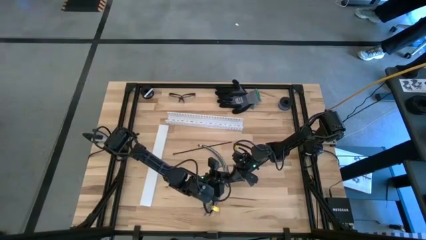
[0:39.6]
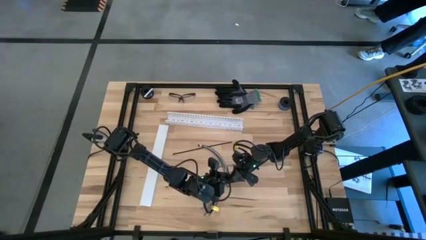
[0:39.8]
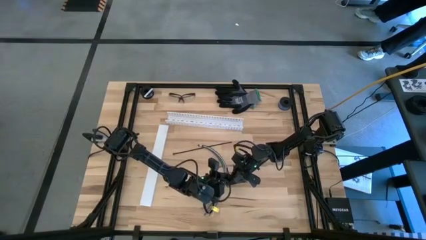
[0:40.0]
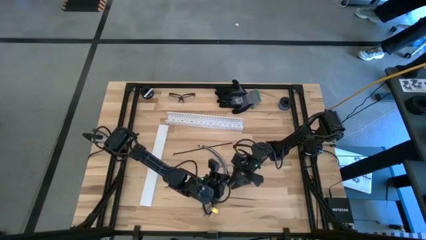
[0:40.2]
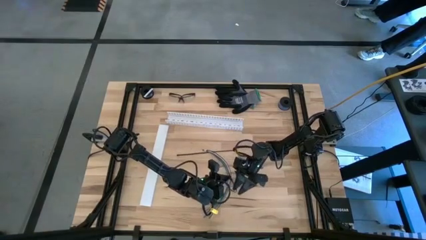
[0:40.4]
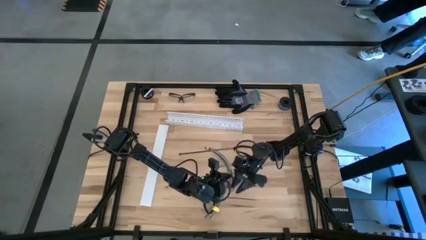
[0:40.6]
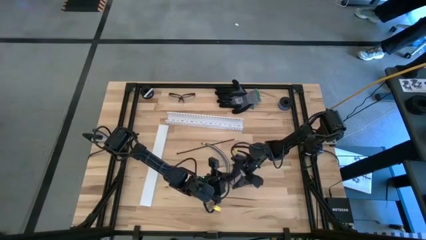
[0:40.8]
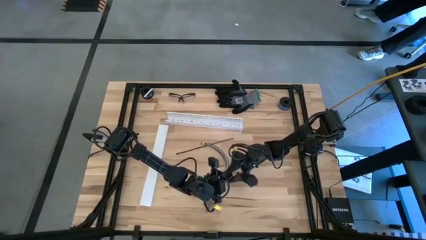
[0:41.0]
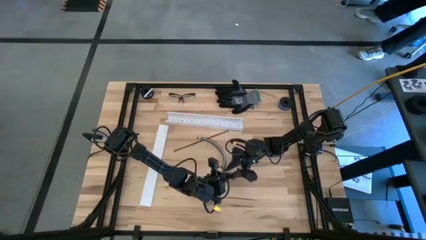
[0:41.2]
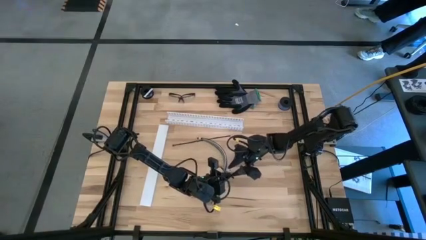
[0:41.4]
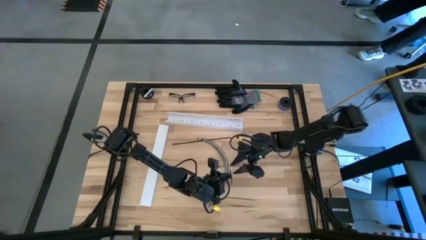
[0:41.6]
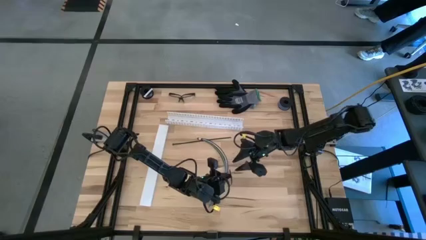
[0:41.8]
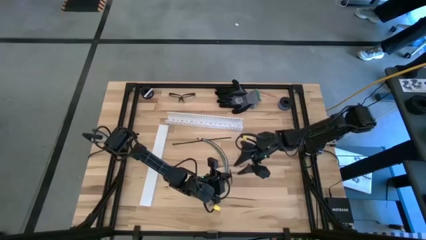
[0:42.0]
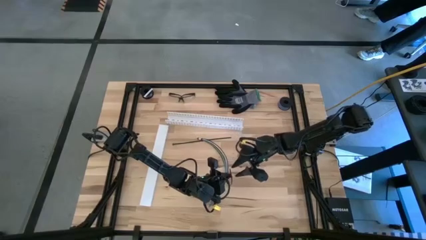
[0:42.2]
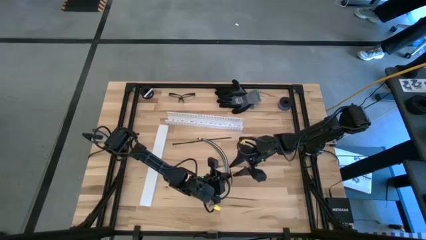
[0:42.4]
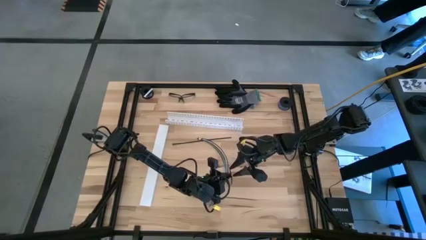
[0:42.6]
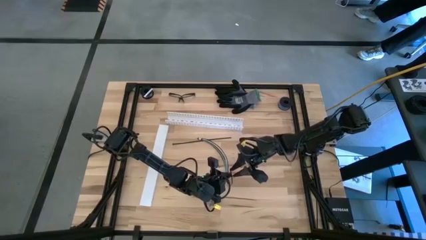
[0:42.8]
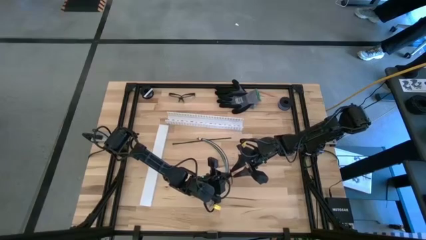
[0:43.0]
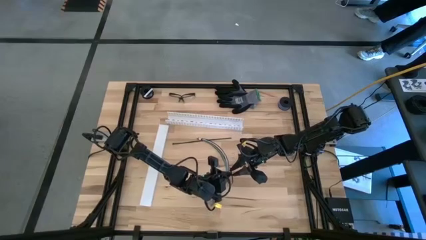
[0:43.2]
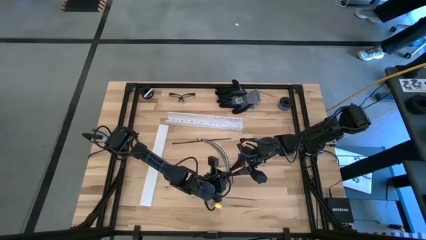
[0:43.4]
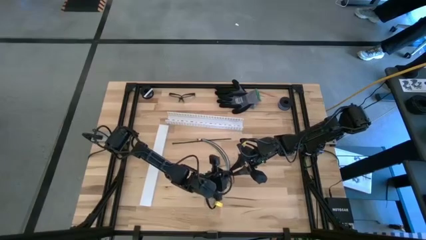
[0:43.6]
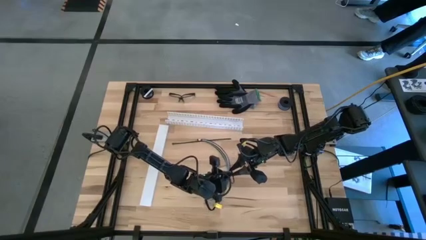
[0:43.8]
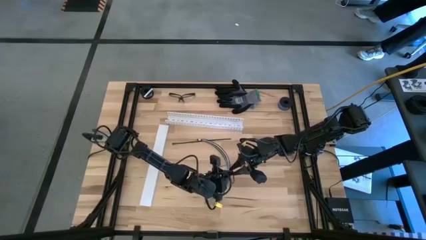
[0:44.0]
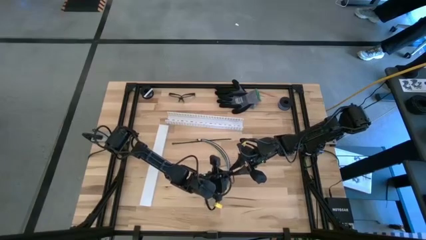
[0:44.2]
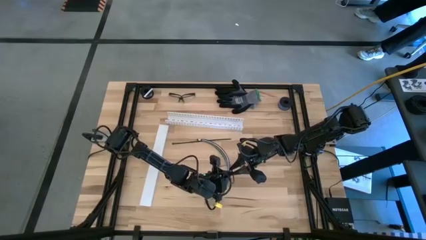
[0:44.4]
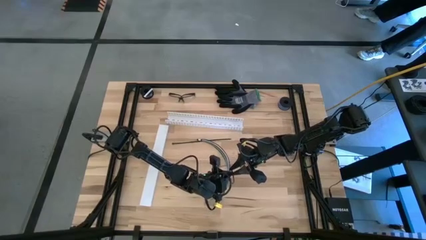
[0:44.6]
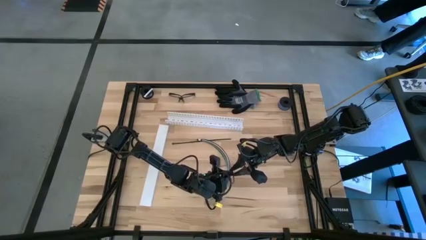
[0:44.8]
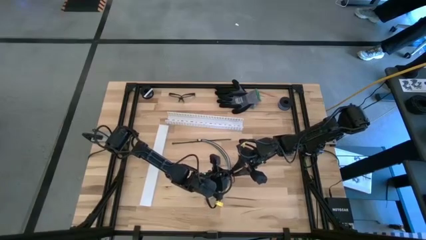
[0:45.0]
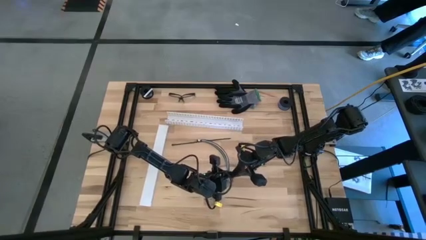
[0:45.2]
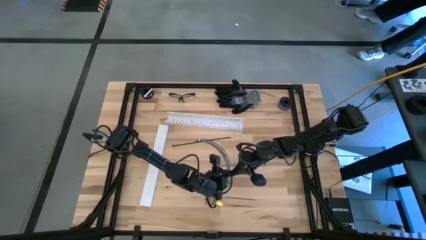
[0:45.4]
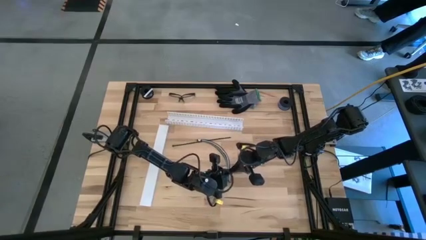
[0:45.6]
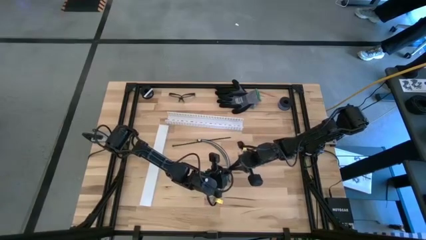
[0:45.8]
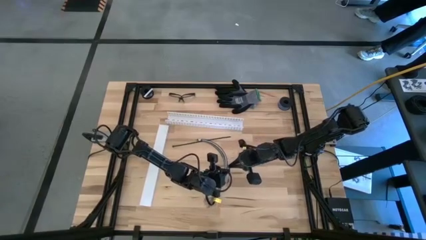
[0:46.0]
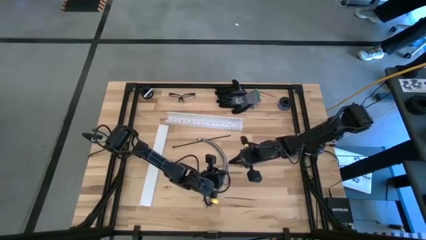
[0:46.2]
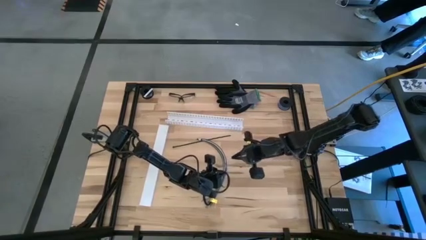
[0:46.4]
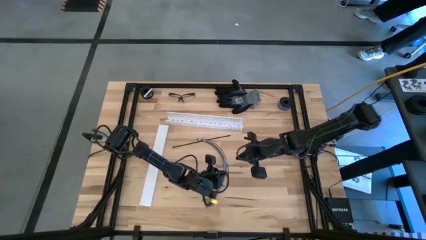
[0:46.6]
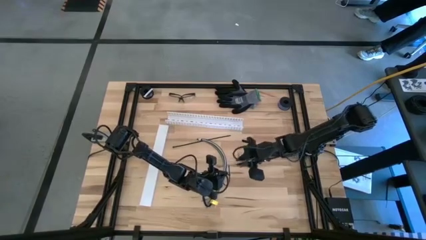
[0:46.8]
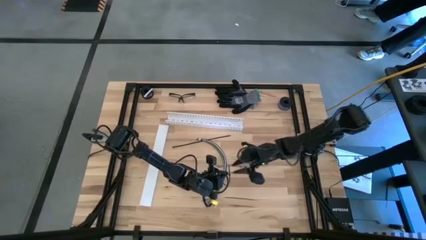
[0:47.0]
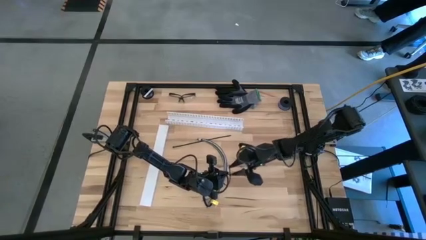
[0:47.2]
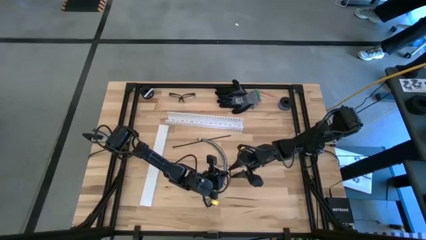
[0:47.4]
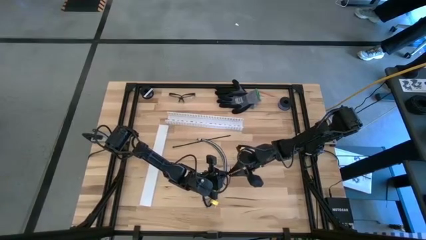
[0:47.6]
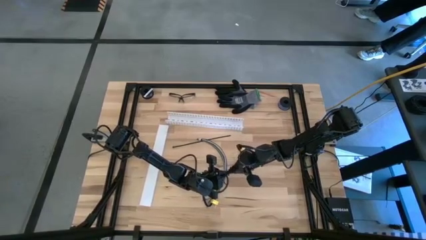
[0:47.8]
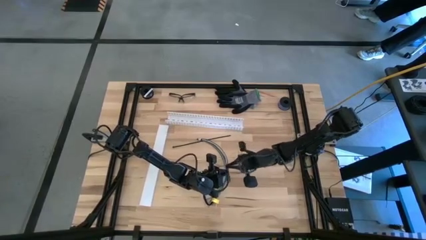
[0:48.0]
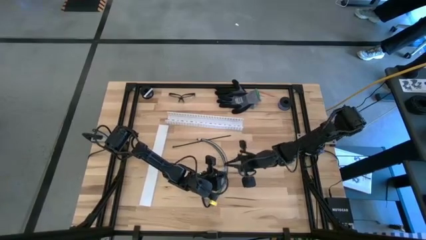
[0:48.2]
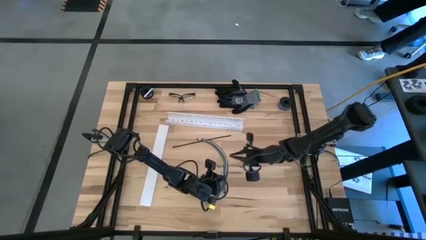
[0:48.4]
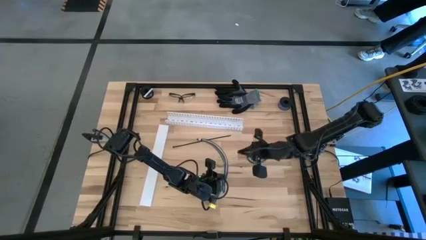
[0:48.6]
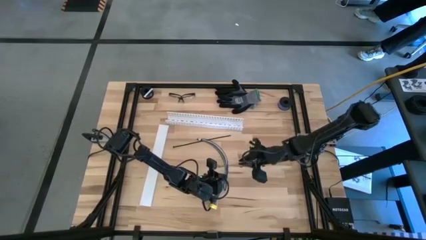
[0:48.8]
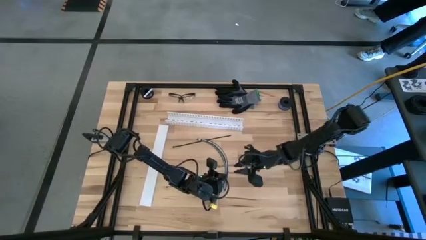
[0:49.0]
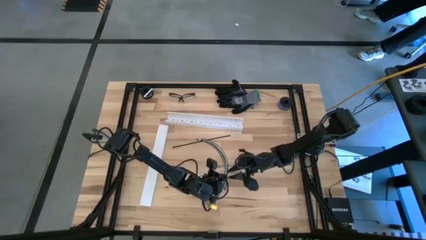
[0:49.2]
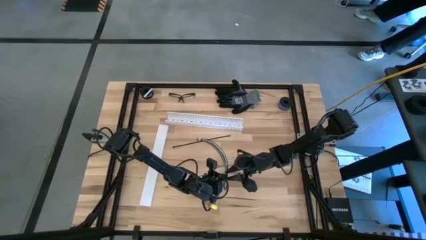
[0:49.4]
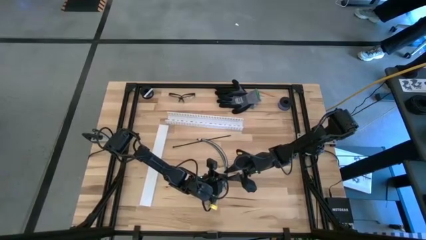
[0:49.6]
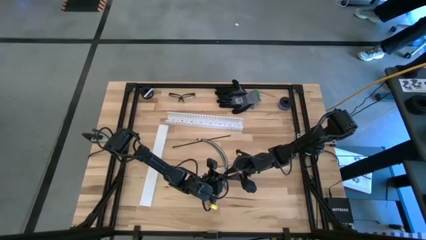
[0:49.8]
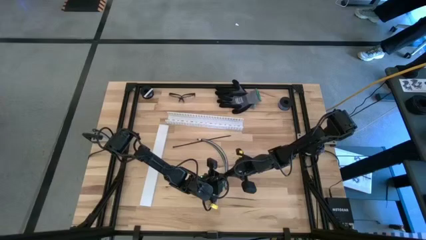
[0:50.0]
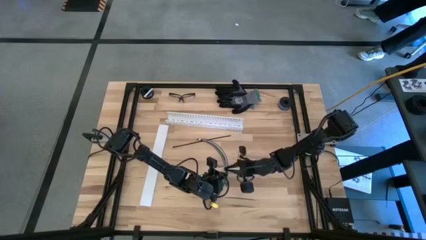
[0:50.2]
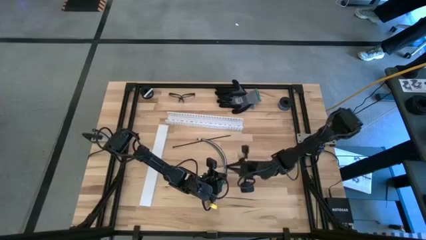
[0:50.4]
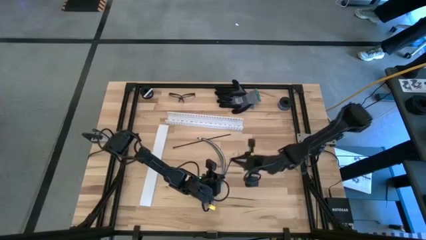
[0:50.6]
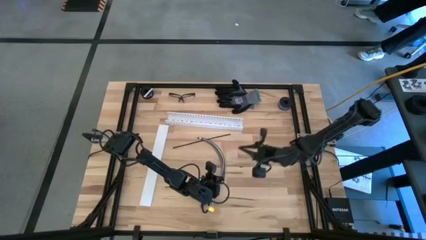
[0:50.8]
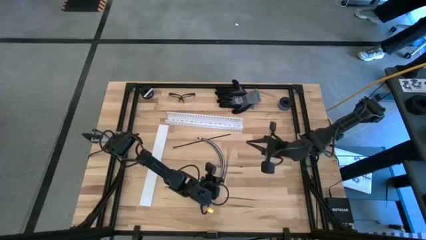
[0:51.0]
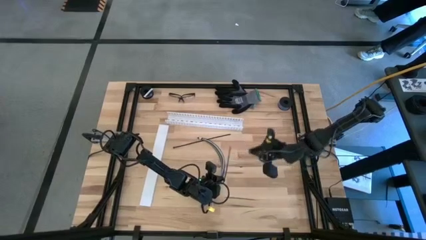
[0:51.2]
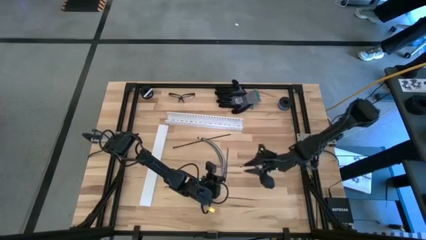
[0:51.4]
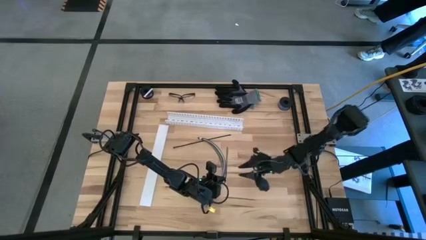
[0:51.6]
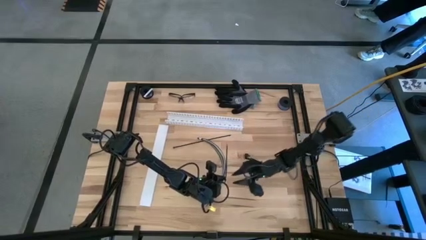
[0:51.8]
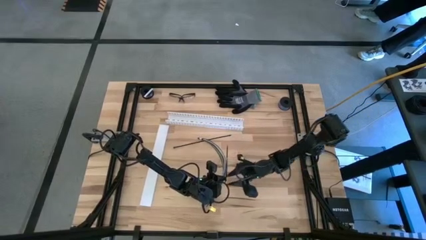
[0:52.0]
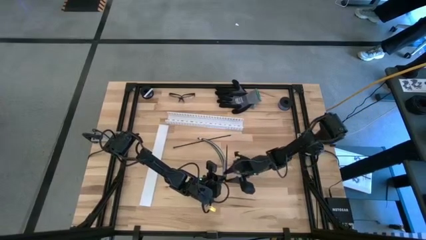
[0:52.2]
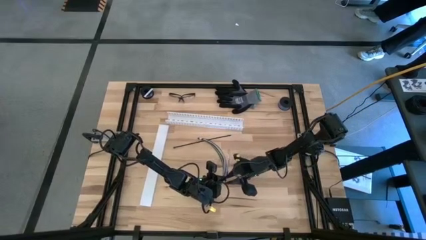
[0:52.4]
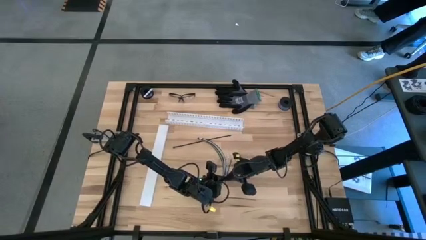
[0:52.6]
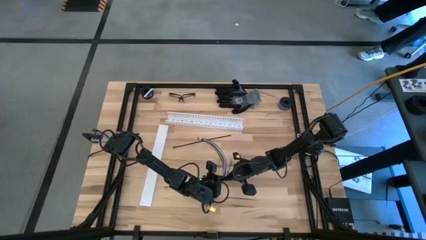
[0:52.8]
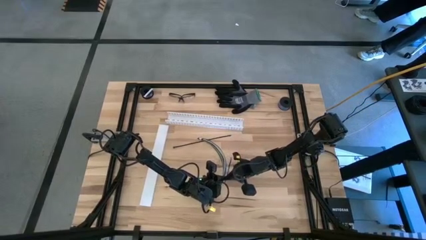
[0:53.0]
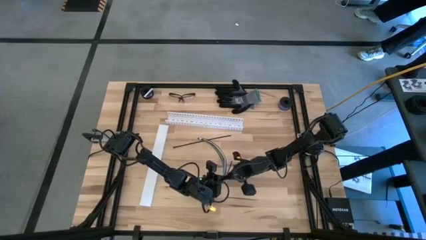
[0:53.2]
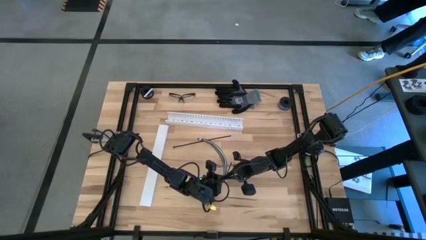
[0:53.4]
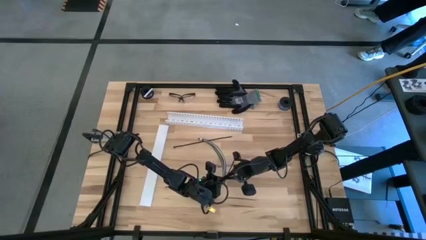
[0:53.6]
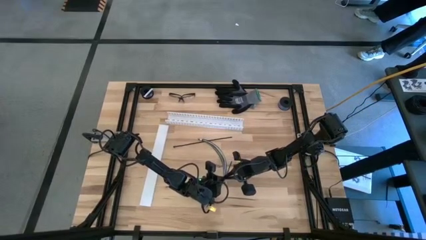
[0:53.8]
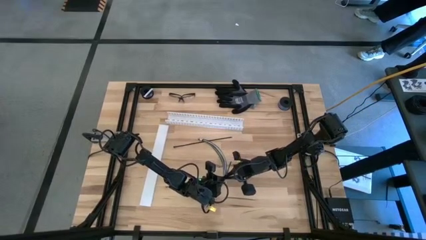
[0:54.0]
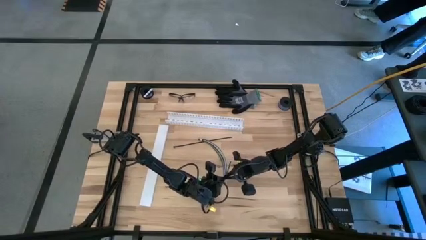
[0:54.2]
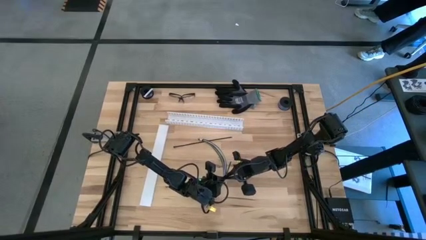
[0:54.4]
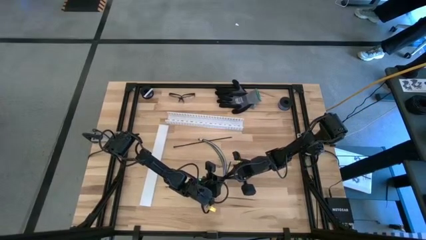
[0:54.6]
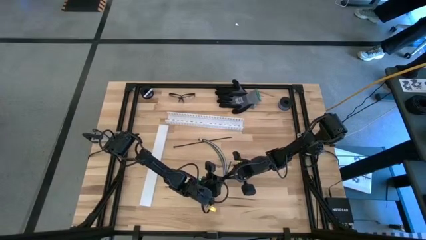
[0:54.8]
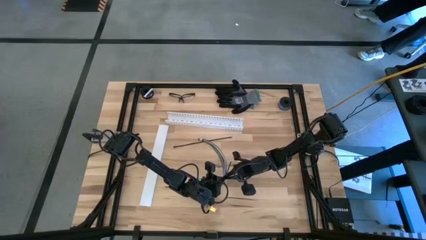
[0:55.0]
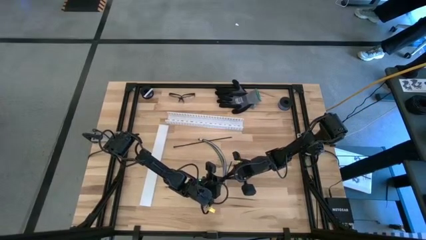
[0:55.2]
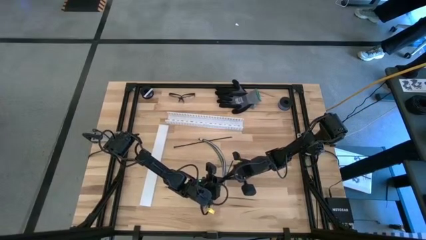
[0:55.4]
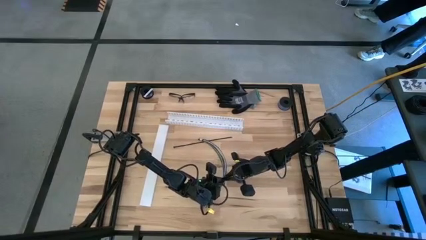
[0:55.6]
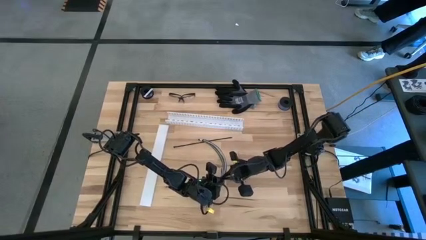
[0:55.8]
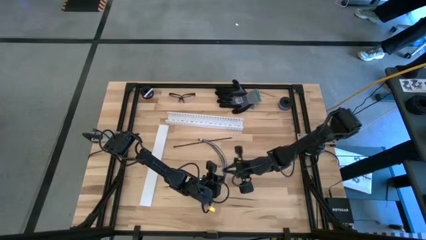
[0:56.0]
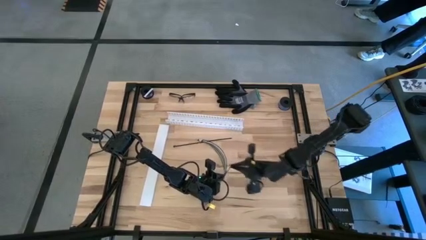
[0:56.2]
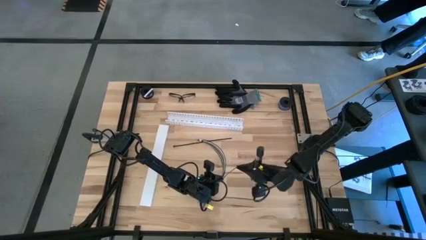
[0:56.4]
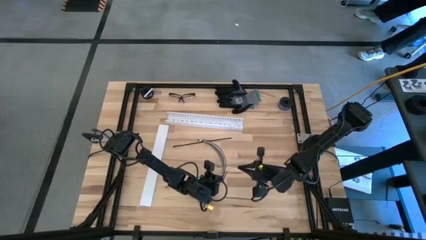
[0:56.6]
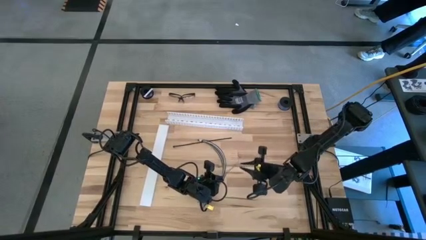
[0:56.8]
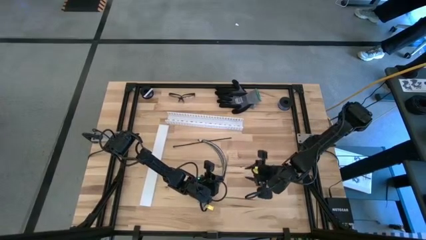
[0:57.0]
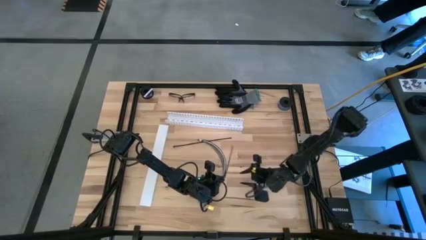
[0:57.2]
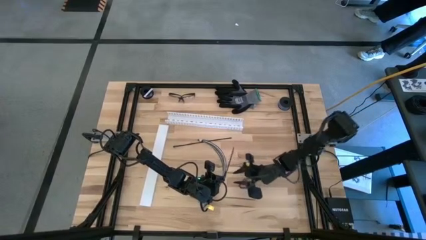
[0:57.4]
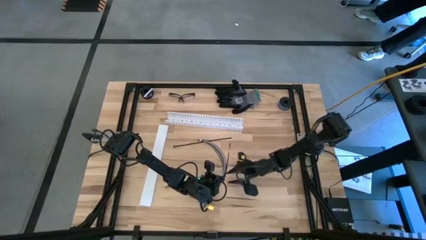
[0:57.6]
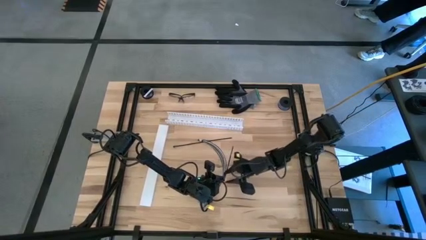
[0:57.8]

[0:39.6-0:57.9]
Task: Ziptie cables
Wrap the black zip tie on the cable
